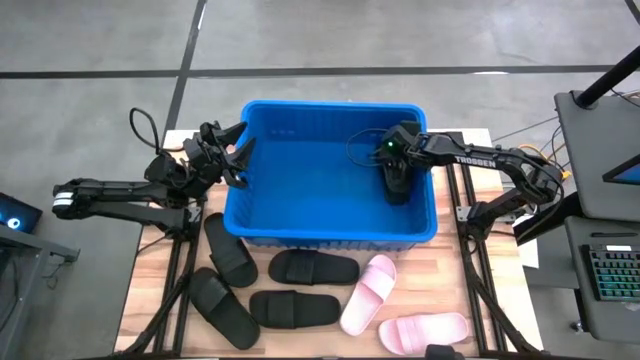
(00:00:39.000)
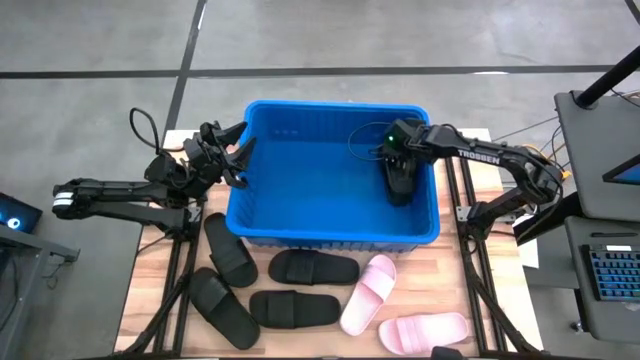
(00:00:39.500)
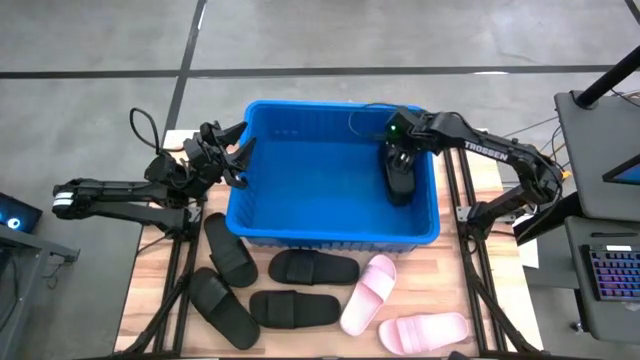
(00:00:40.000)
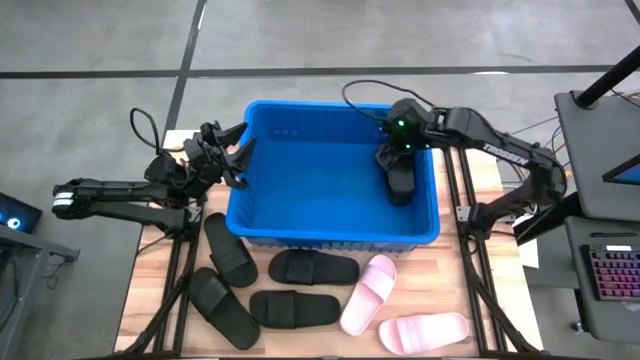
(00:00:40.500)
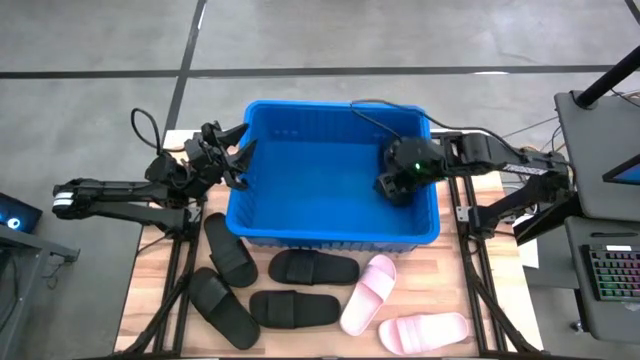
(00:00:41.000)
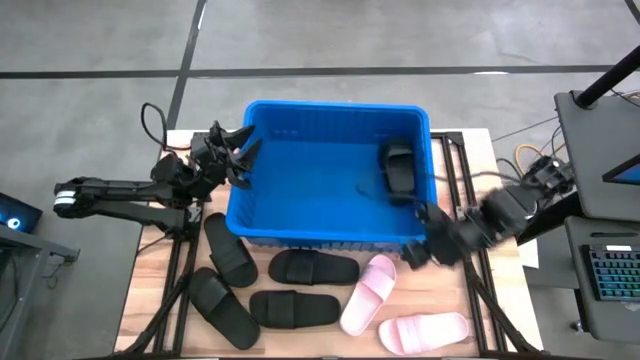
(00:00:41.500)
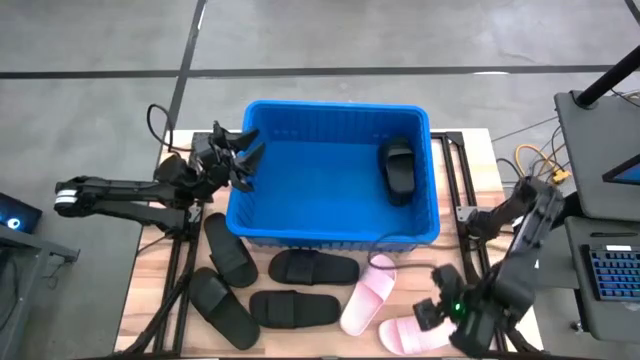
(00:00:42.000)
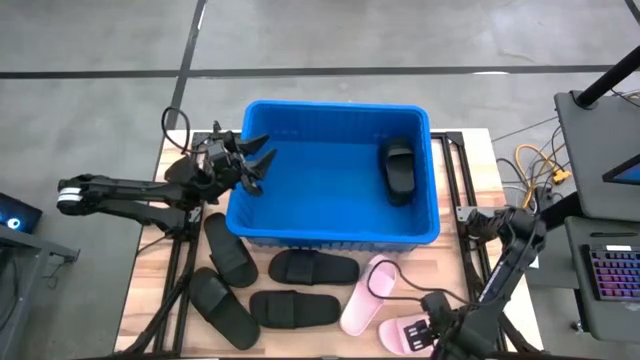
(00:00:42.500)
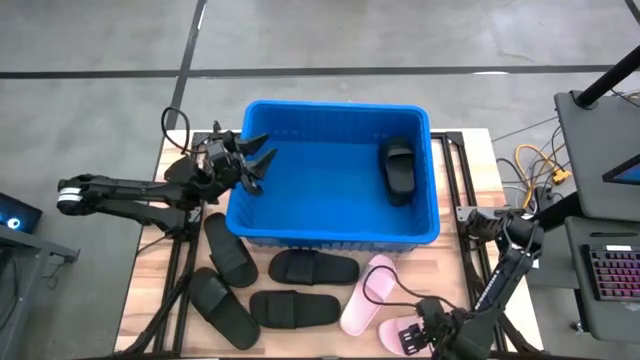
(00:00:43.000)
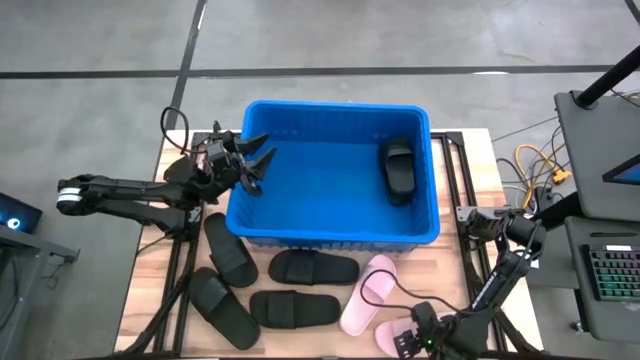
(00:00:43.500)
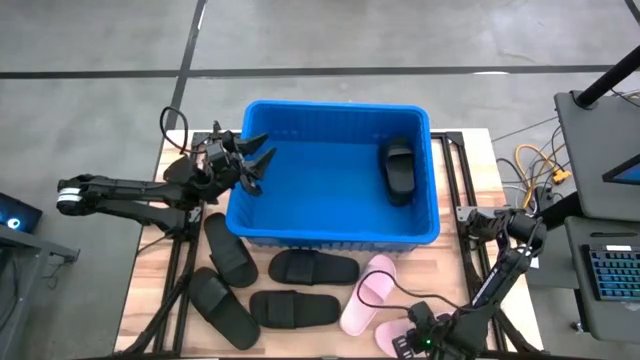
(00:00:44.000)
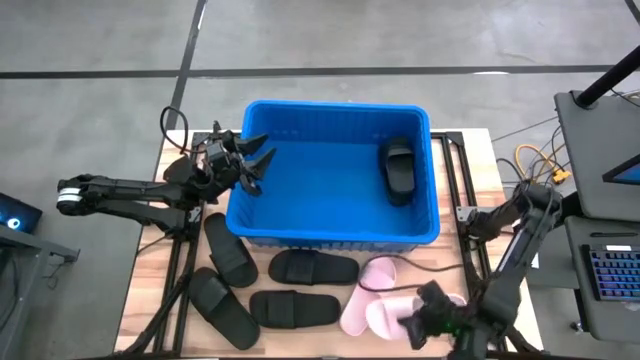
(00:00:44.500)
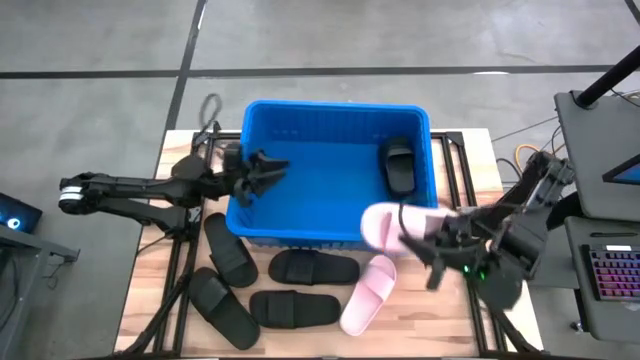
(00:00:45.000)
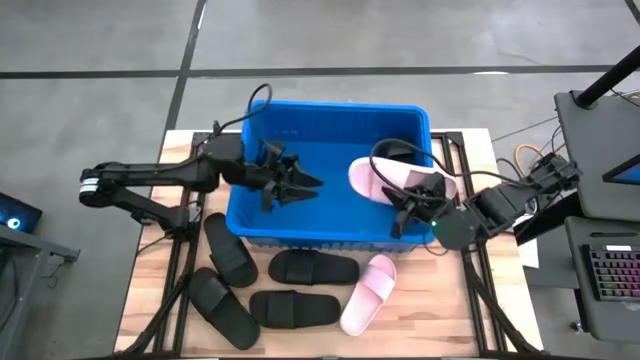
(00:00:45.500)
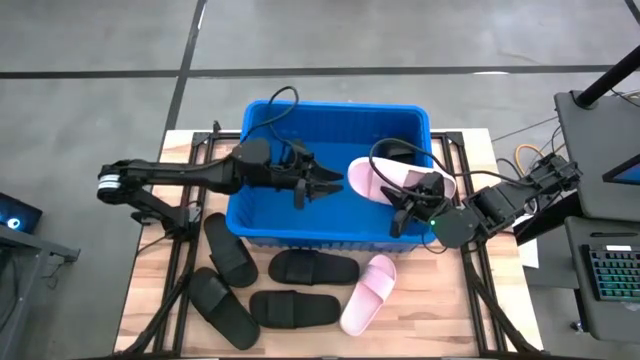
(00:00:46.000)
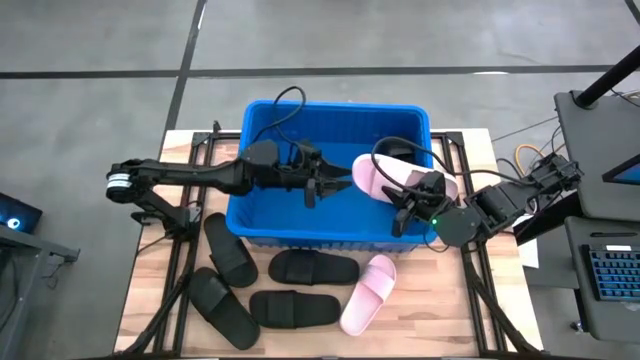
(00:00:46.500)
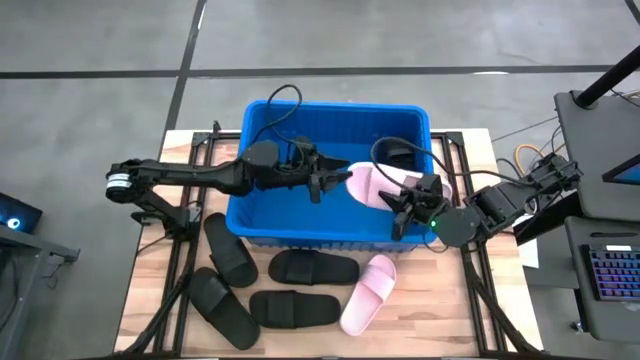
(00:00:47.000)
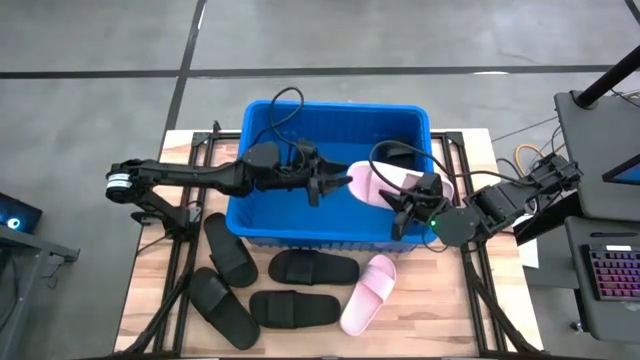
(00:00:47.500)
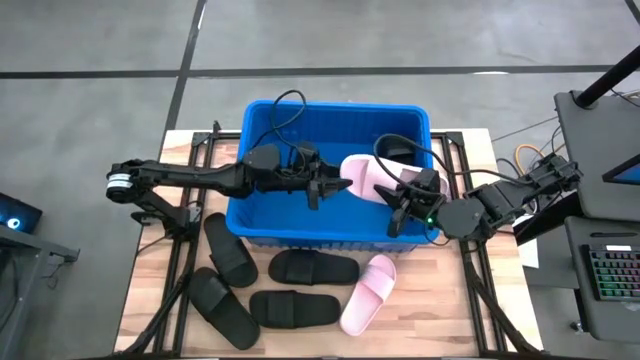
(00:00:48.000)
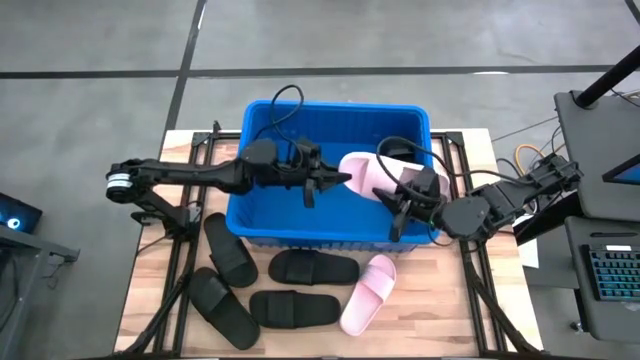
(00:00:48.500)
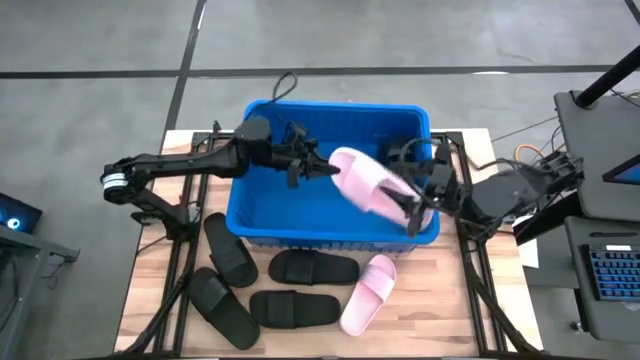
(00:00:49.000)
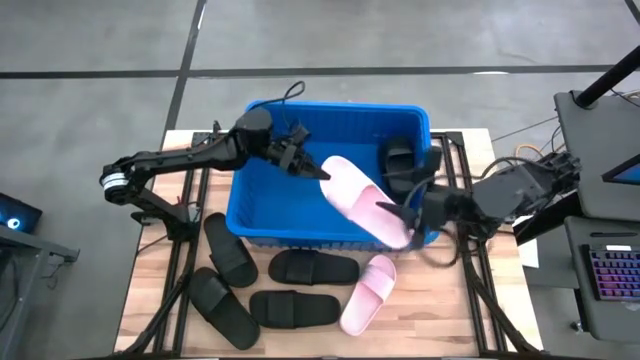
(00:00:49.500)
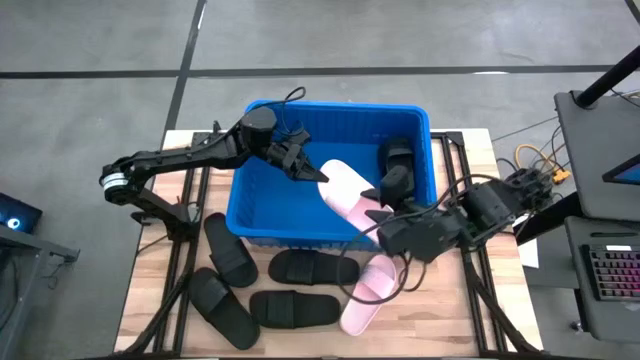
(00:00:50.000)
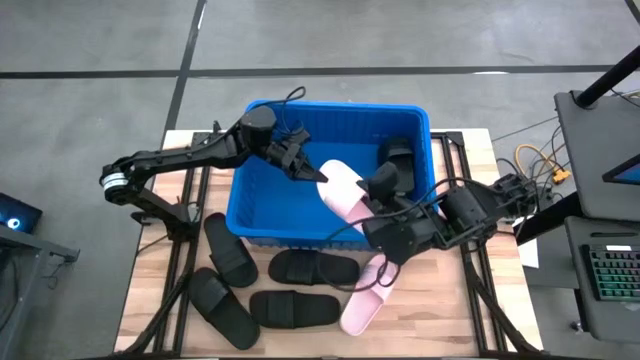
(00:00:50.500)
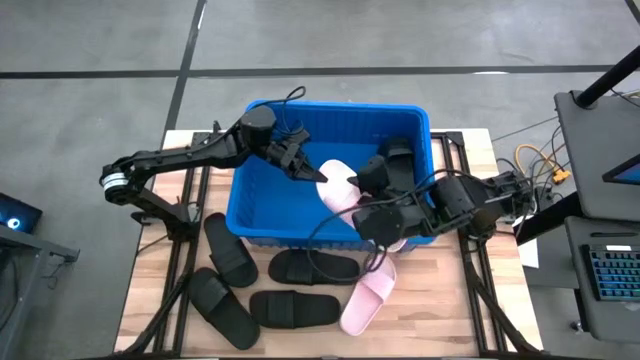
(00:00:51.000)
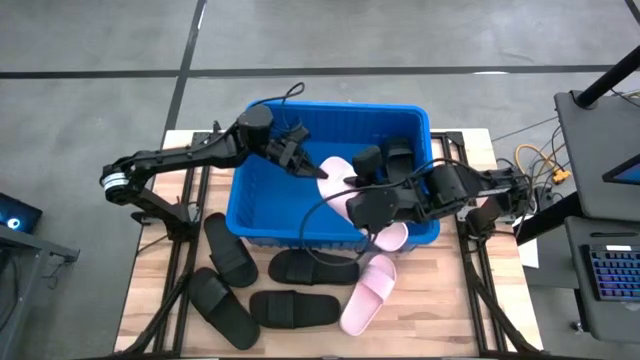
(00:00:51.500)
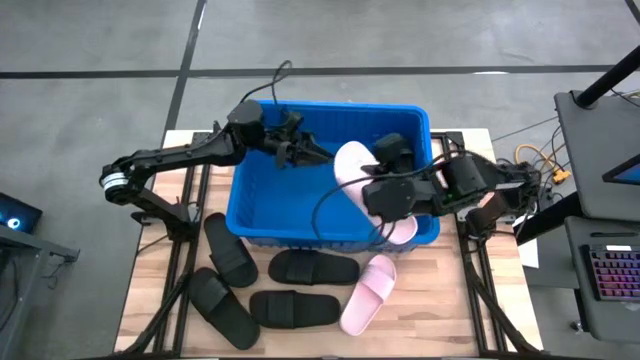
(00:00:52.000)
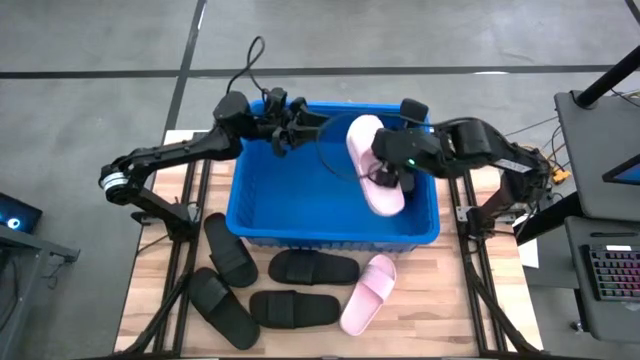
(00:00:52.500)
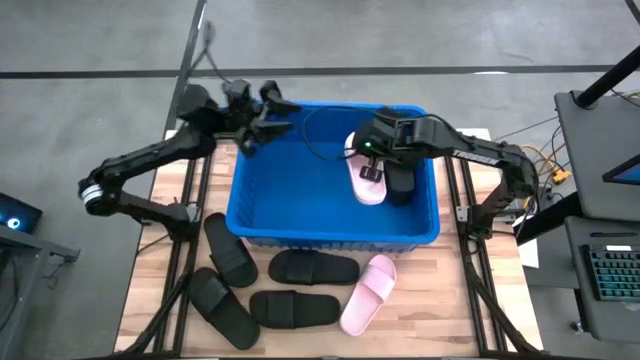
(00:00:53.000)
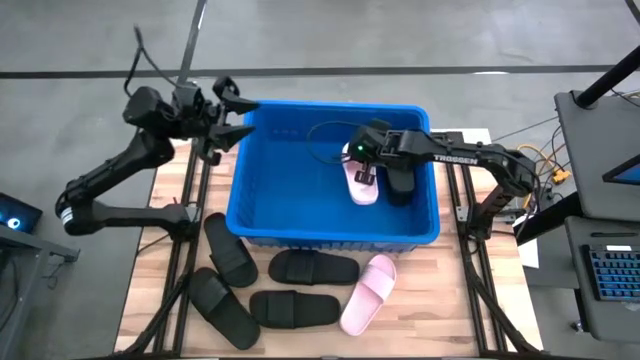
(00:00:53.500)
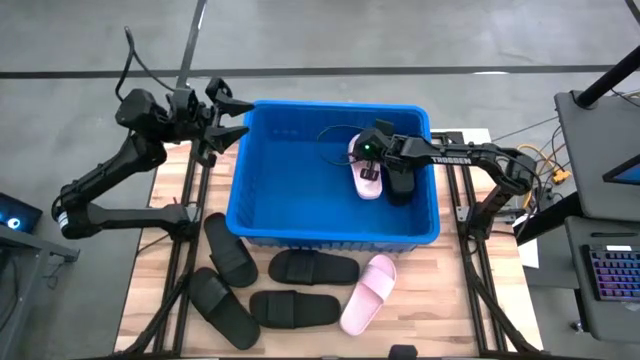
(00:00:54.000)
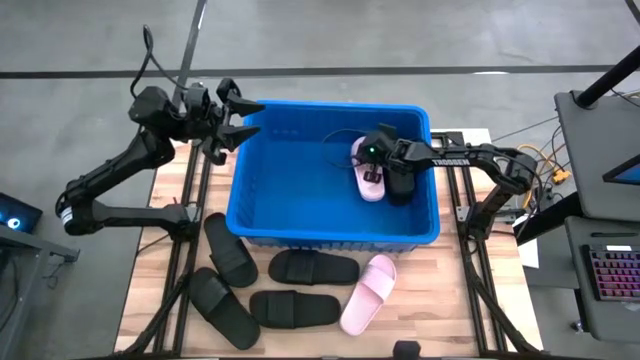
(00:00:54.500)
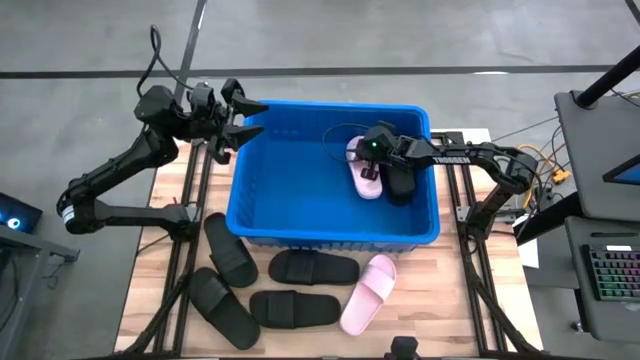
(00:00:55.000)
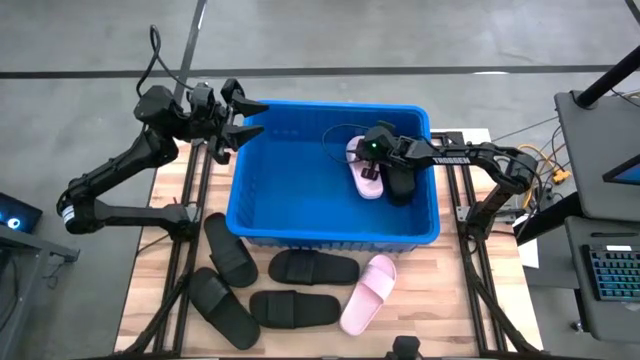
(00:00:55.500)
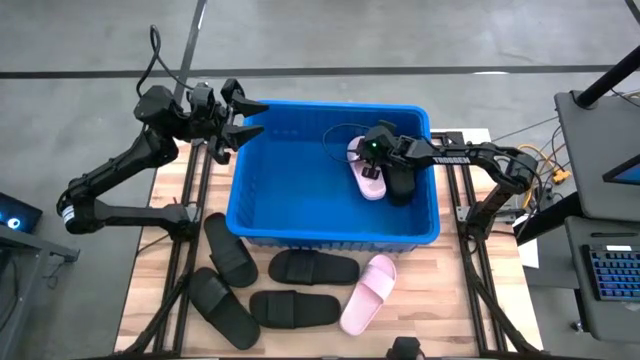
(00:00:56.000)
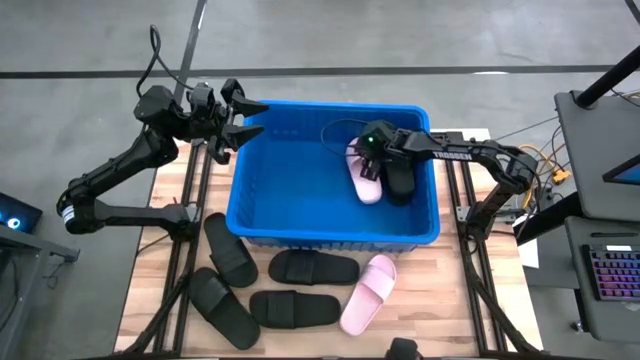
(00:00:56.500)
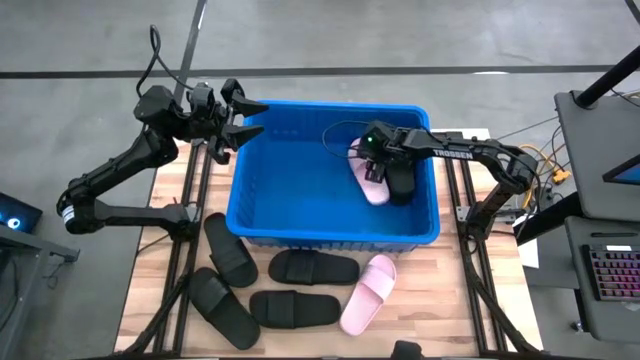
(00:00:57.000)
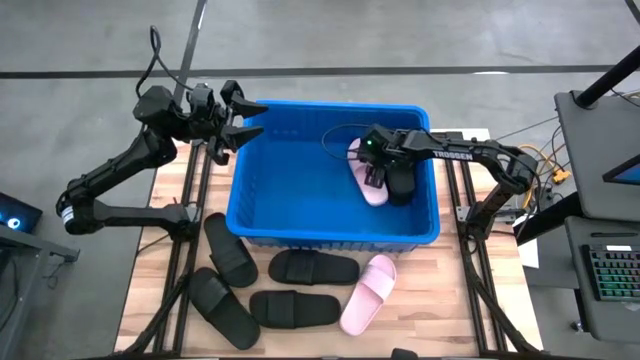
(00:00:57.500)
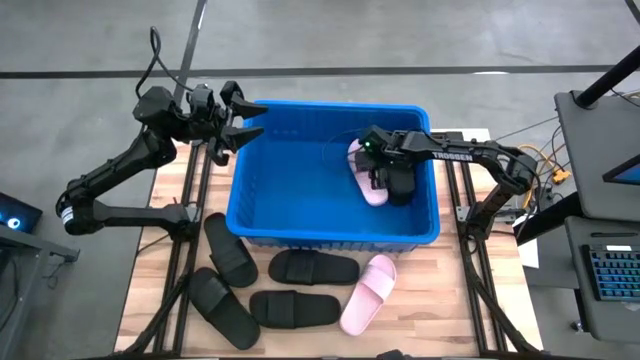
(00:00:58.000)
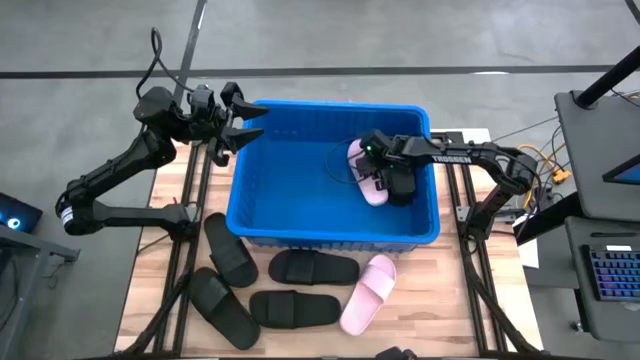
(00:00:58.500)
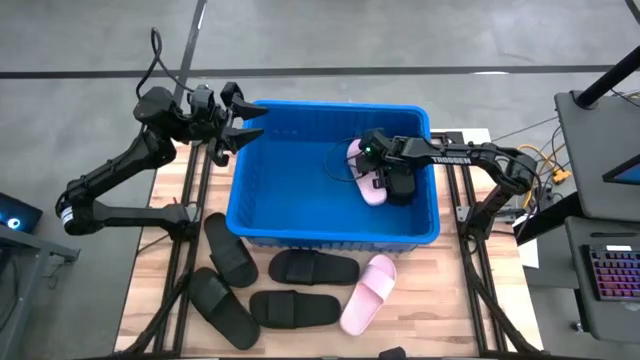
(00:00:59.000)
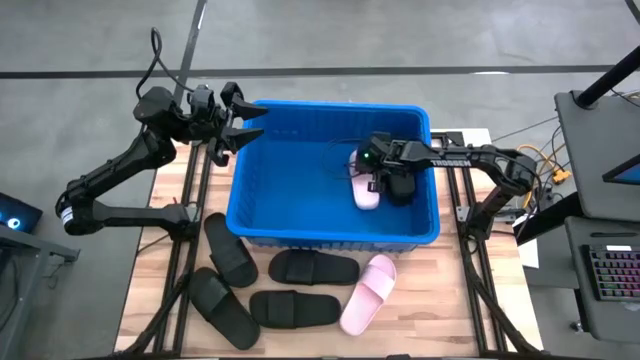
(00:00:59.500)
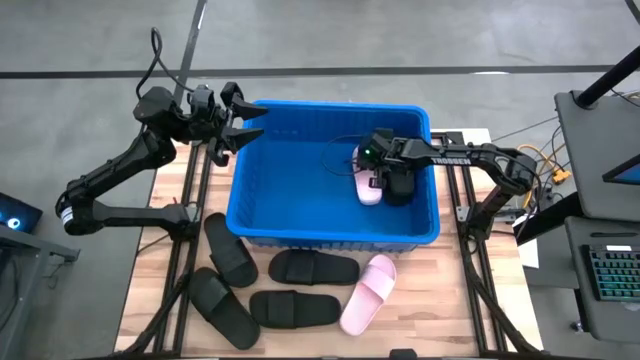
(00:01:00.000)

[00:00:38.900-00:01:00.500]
Task: Pick and place slides into bin
Put the pink slide into the blue container
